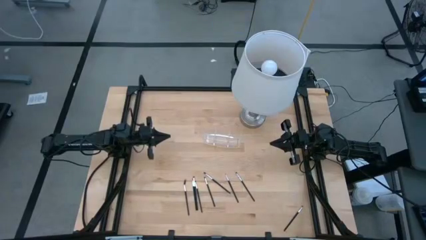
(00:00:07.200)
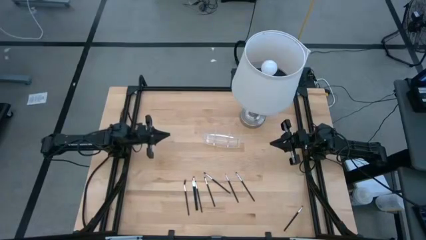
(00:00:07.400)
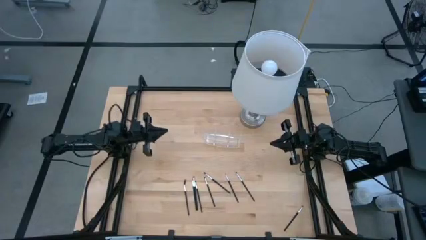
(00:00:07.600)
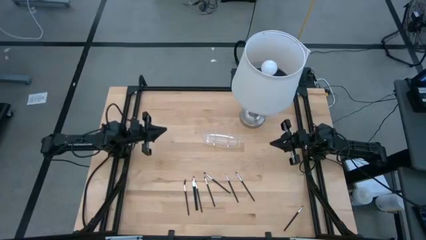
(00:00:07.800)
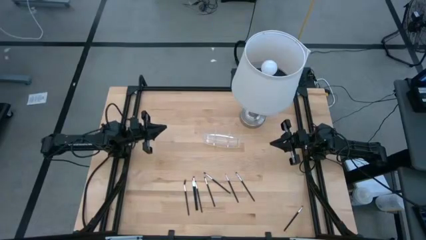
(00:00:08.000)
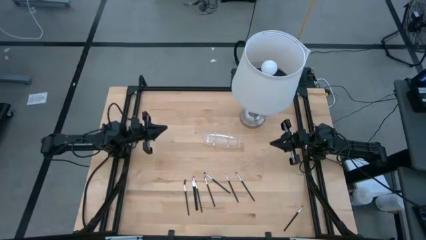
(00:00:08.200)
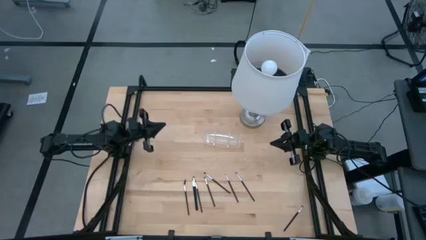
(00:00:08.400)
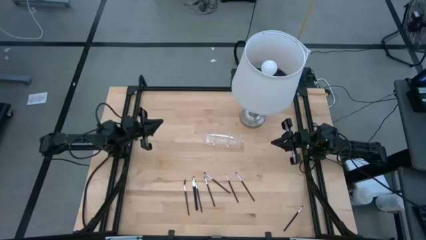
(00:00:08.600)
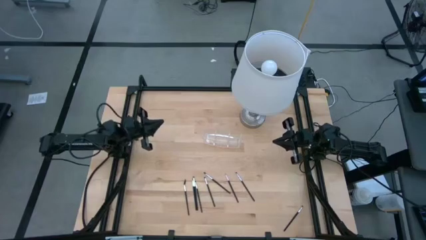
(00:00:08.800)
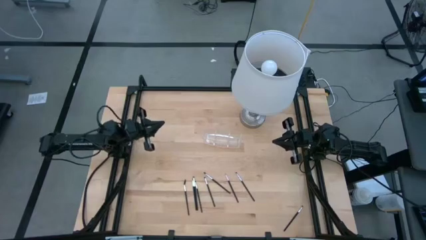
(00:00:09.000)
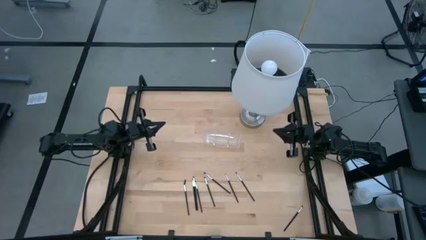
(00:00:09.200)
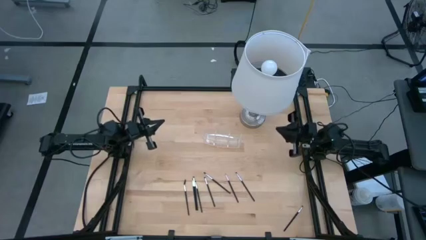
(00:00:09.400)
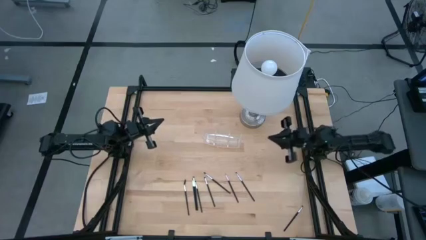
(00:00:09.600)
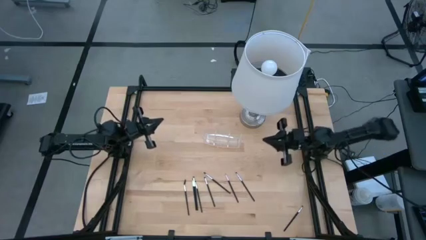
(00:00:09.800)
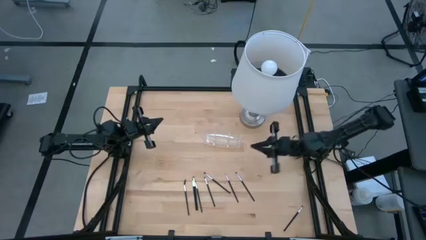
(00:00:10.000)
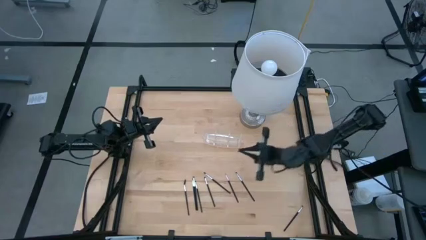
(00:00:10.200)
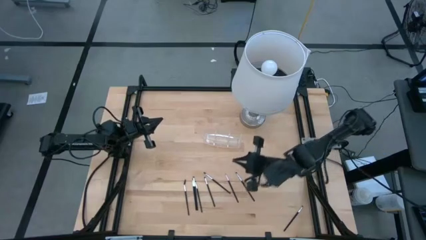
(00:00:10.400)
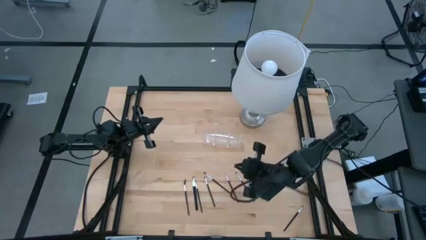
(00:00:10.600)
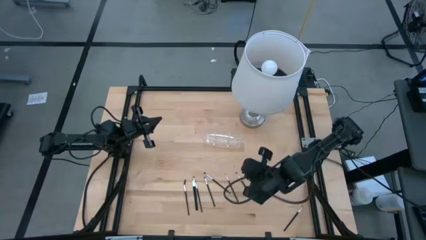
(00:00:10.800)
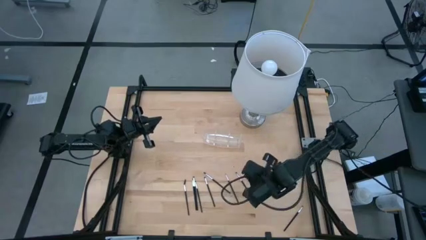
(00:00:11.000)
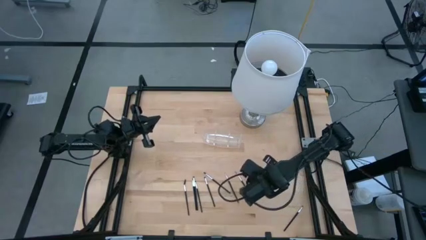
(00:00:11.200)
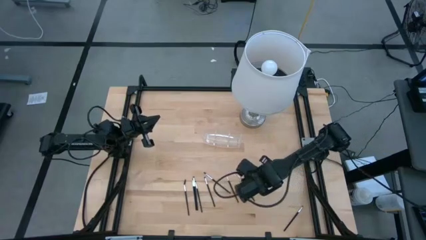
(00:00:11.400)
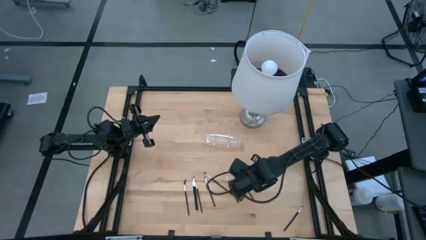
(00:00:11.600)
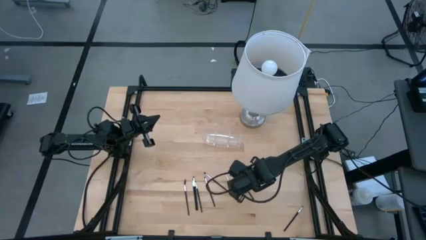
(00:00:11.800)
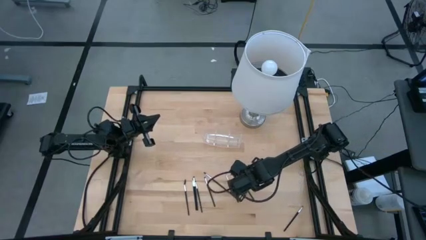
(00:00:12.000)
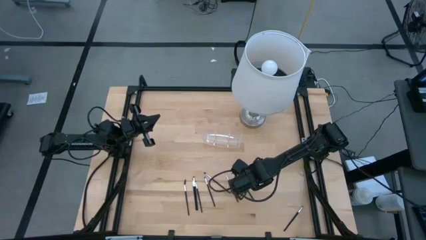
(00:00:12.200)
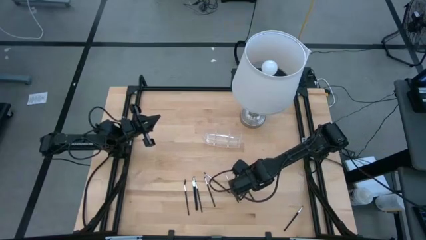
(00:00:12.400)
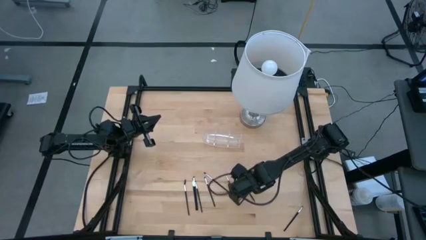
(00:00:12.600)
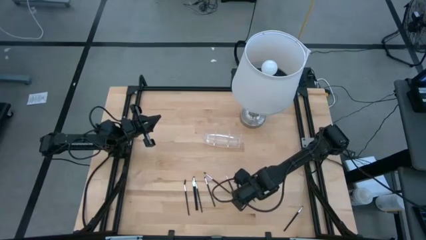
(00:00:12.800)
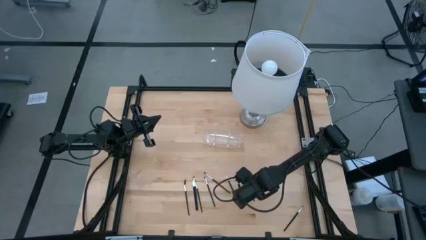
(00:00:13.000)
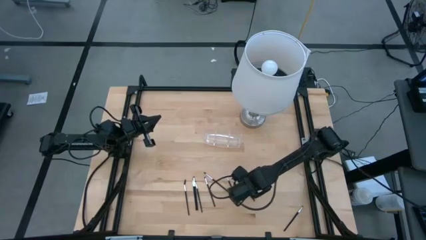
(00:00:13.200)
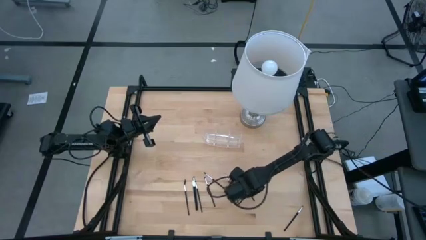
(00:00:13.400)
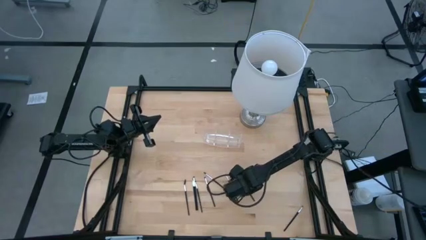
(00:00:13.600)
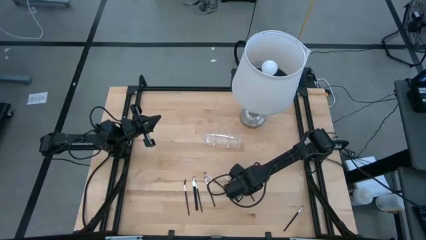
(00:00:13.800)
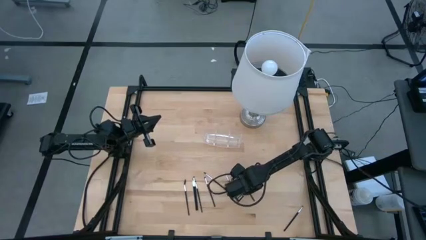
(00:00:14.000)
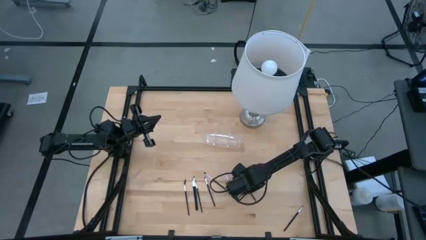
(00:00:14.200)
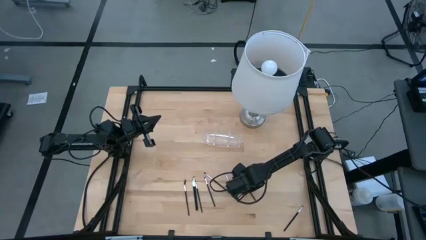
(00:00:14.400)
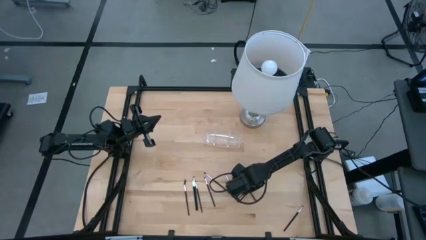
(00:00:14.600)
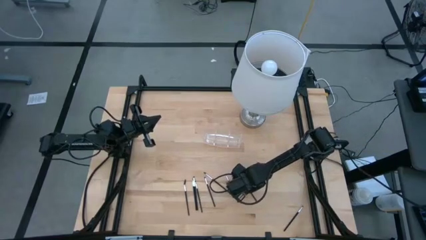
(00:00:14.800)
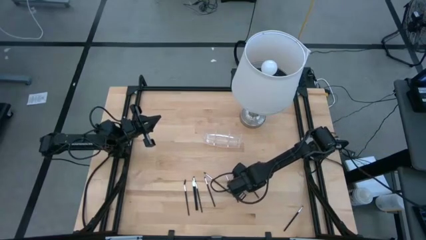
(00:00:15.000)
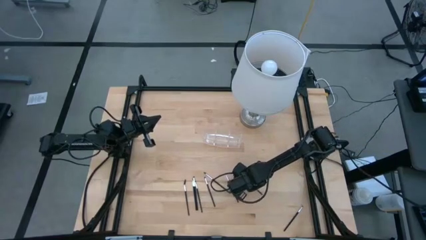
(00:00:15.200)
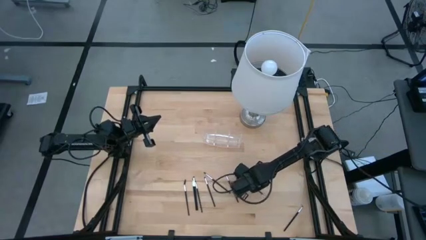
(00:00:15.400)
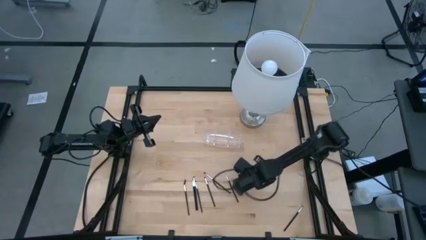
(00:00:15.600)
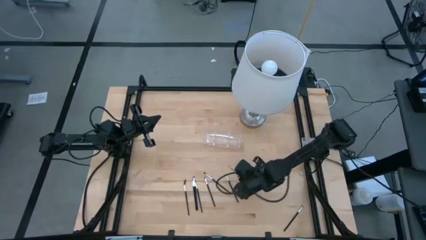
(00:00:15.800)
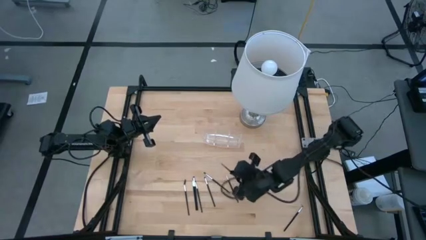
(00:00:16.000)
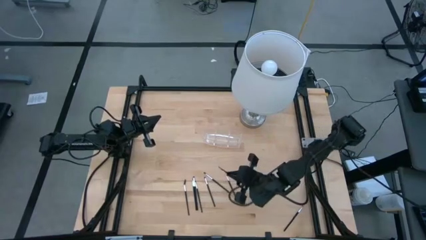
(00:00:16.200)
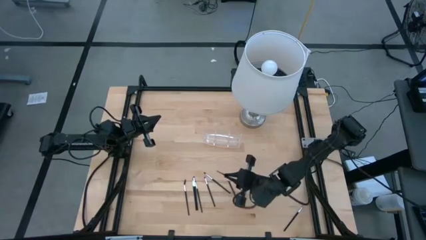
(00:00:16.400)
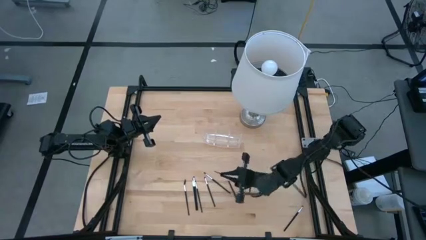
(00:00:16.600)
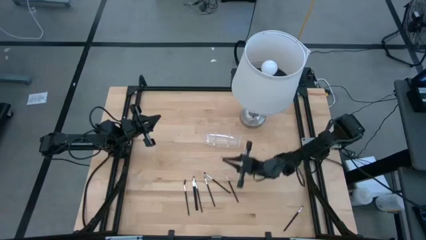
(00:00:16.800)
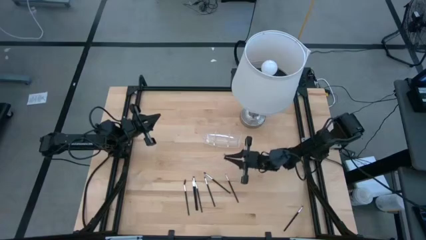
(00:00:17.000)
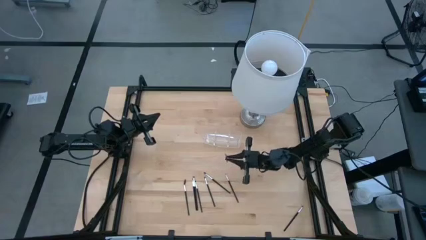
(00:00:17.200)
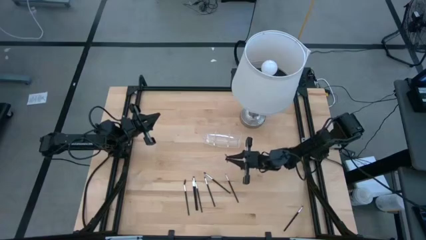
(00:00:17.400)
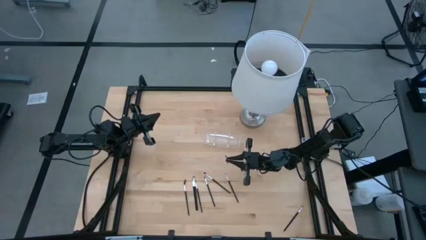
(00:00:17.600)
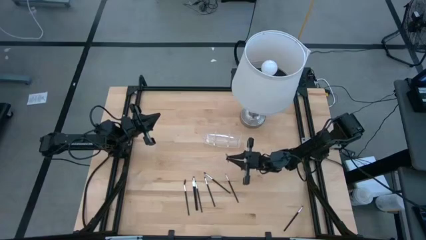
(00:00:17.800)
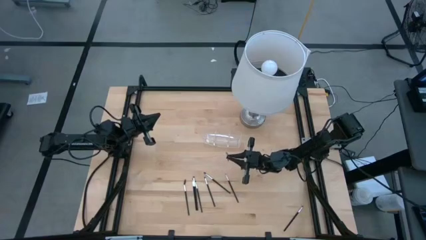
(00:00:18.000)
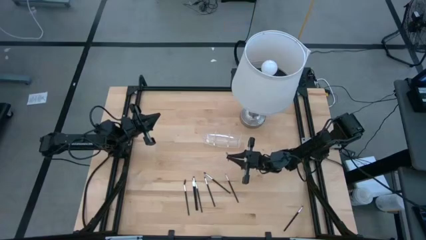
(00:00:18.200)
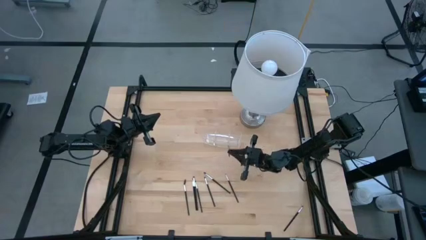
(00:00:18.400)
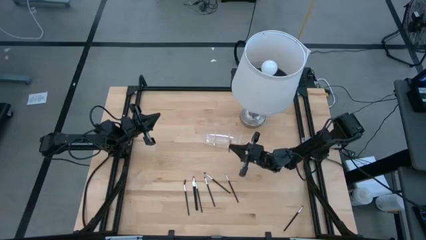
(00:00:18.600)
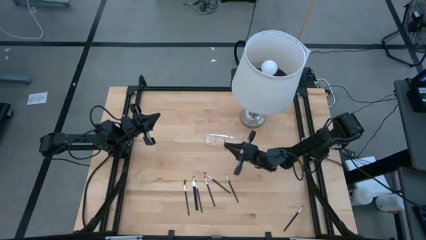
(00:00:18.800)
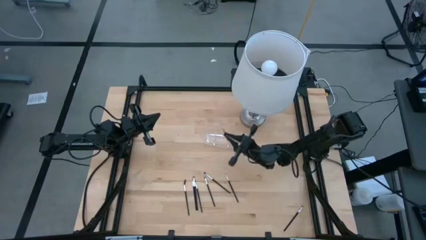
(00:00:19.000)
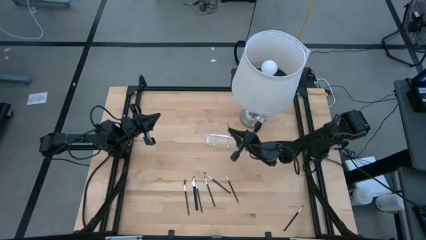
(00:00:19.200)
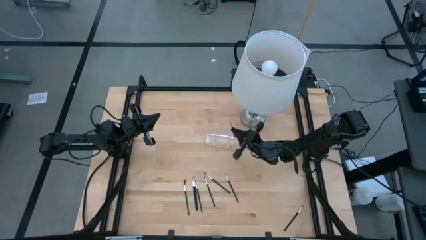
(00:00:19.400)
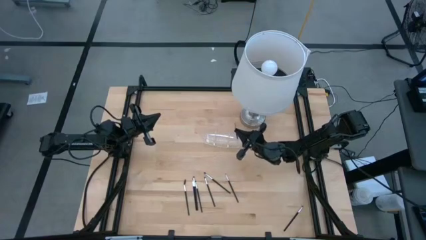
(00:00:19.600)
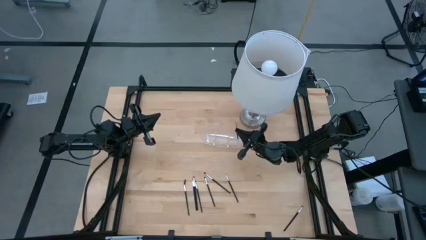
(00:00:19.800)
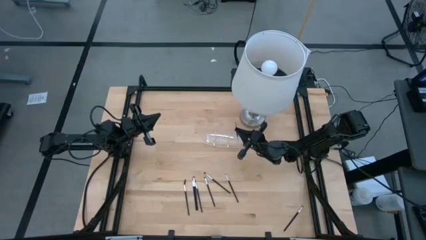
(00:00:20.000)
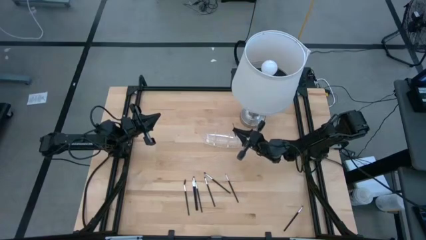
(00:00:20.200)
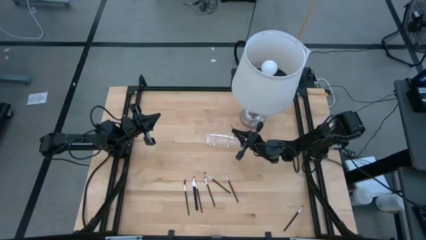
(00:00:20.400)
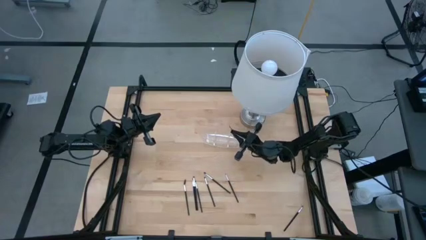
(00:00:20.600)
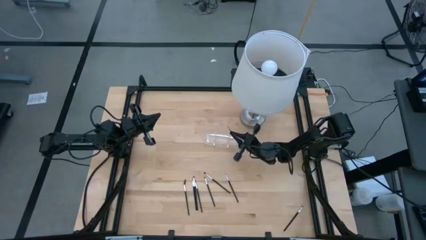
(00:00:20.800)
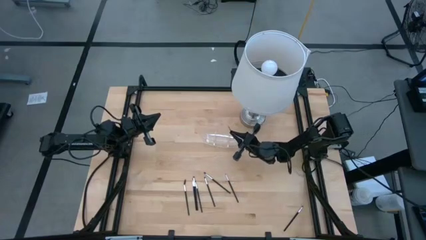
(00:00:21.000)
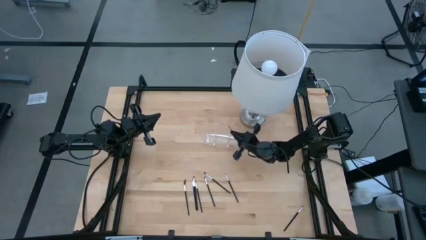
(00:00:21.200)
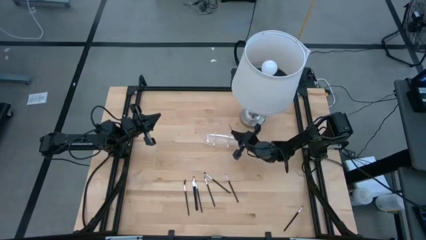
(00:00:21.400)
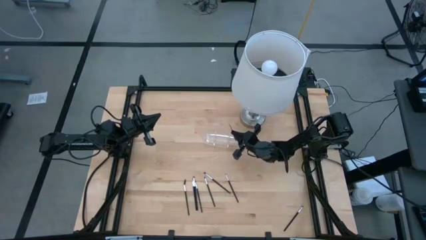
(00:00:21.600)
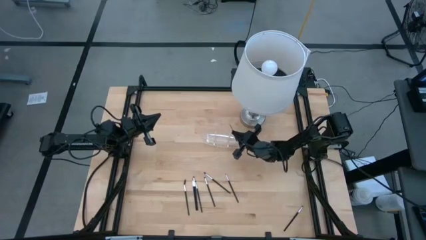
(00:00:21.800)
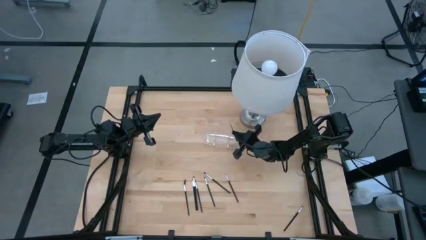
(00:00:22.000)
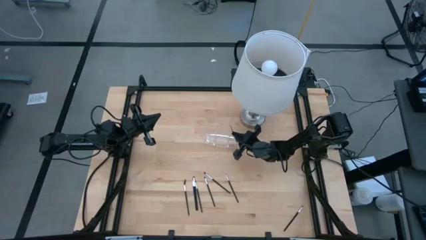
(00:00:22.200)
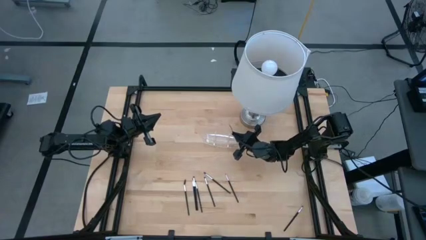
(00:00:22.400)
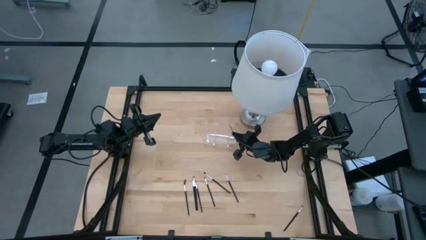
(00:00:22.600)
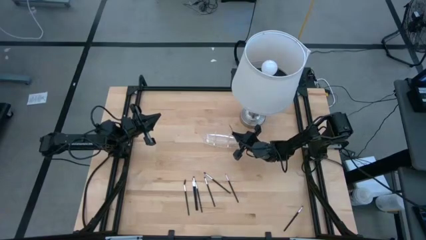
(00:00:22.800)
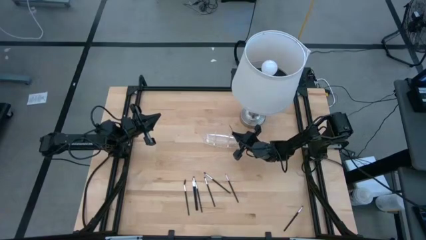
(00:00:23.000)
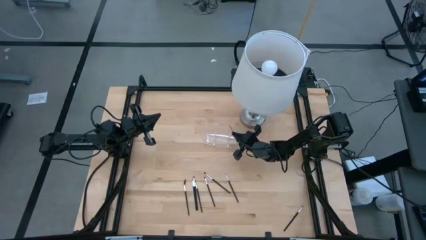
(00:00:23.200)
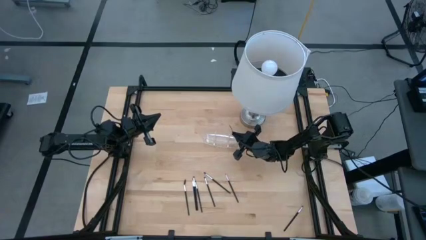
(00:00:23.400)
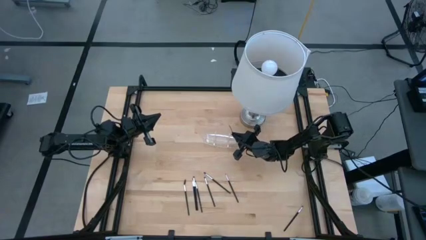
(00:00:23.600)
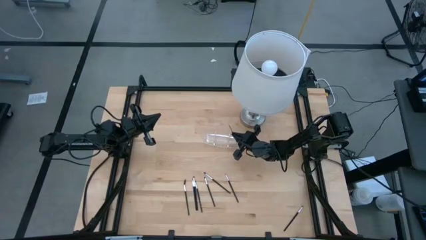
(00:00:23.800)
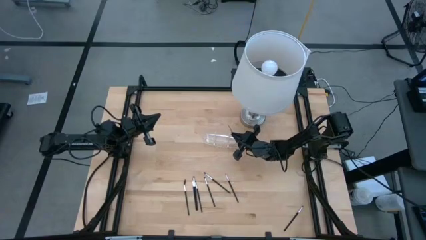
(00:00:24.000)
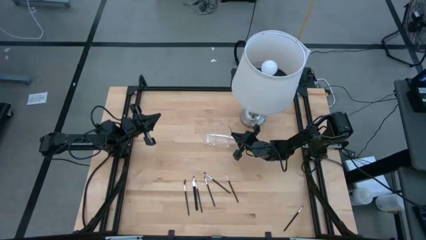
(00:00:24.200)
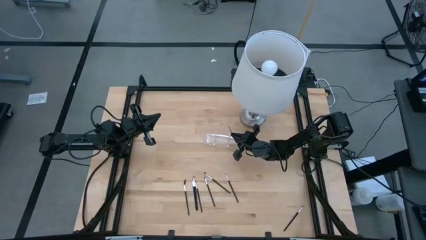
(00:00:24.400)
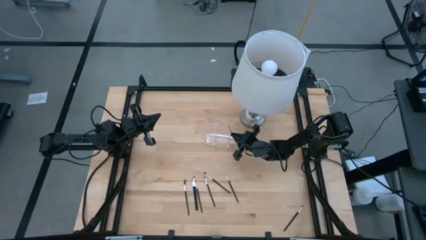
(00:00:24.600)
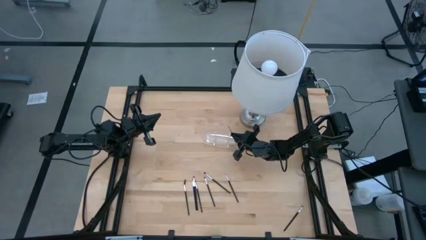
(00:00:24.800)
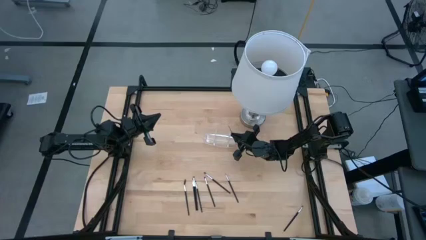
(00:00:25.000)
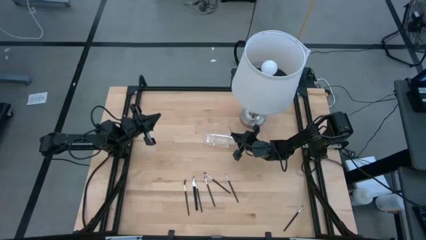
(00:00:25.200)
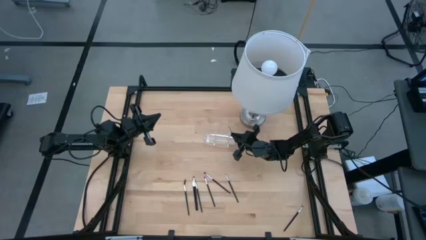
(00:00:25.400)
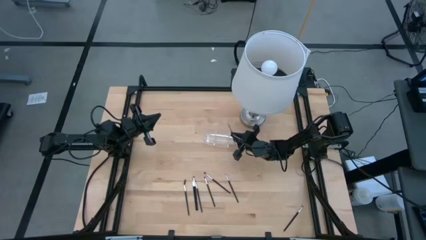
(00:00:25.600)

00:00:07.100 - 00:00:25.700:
Task: Pick & Place Makeup Brushes
Put the black eyeshadow brush into the transparent organizer
